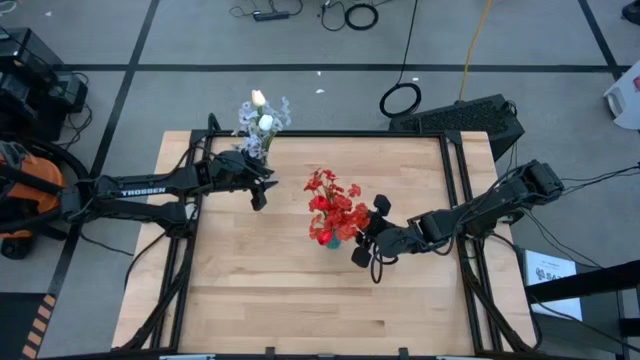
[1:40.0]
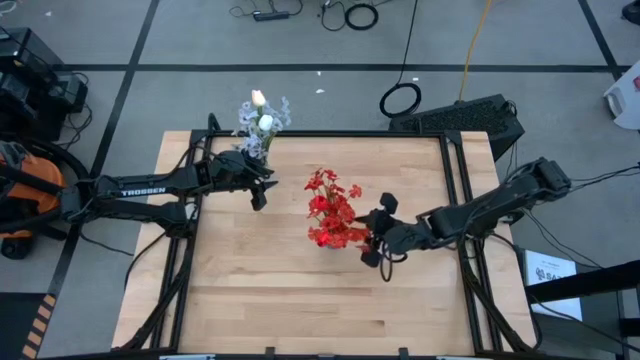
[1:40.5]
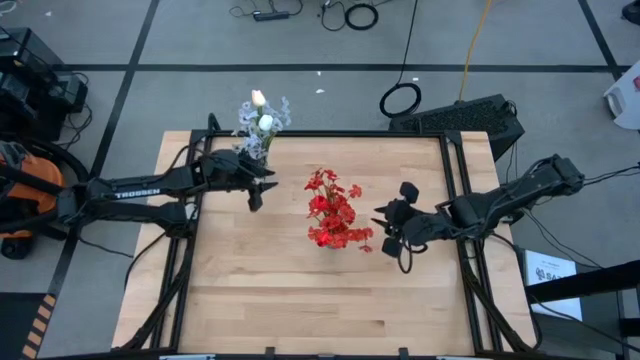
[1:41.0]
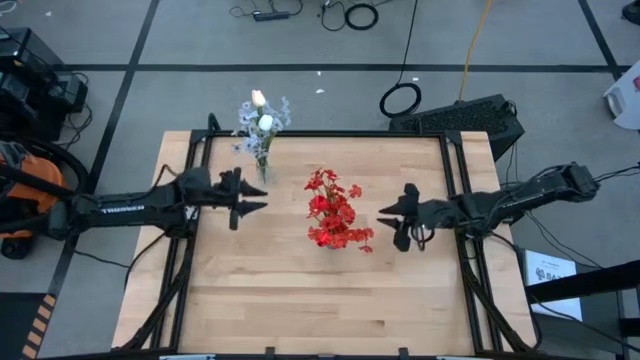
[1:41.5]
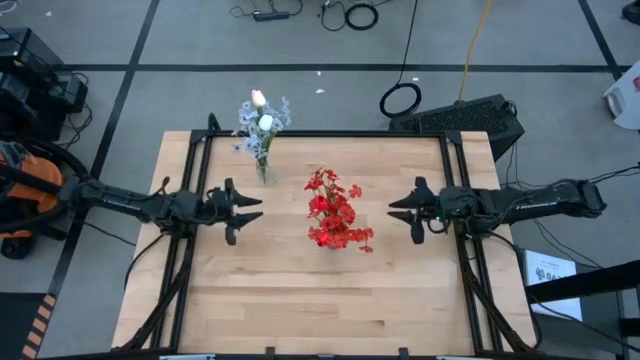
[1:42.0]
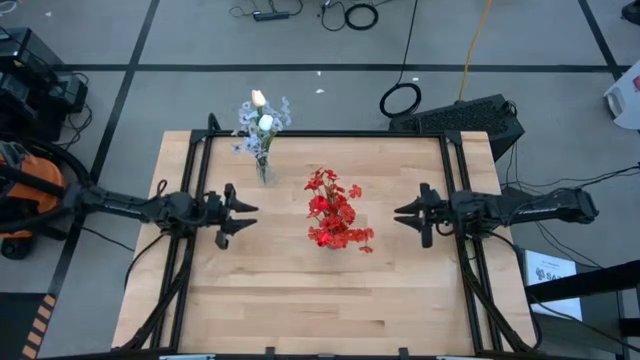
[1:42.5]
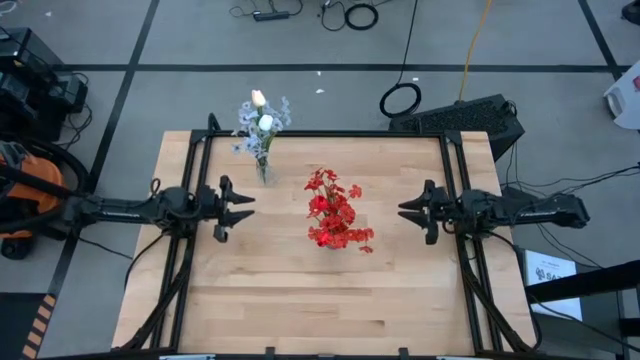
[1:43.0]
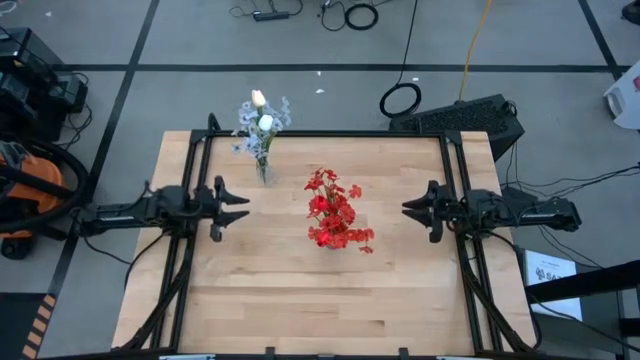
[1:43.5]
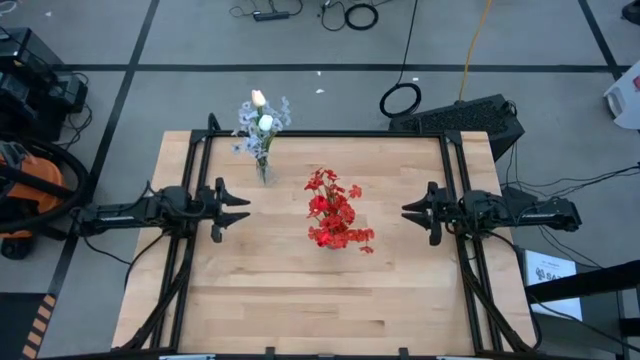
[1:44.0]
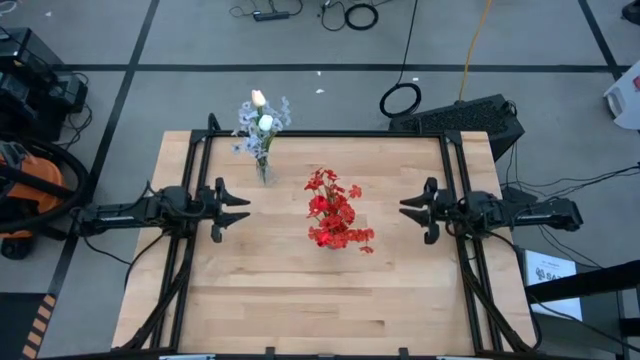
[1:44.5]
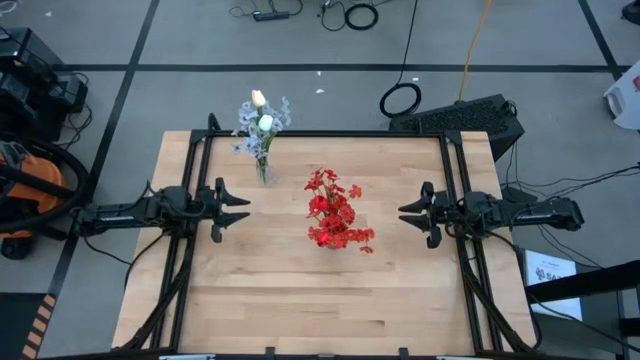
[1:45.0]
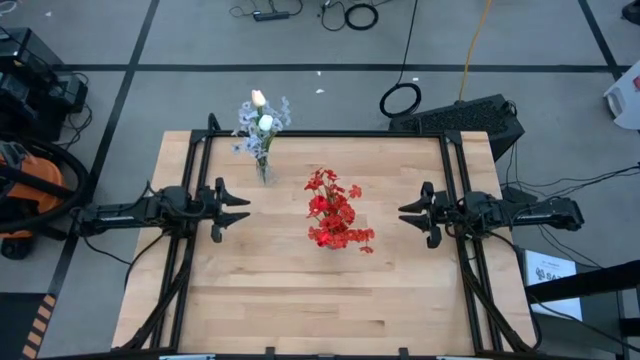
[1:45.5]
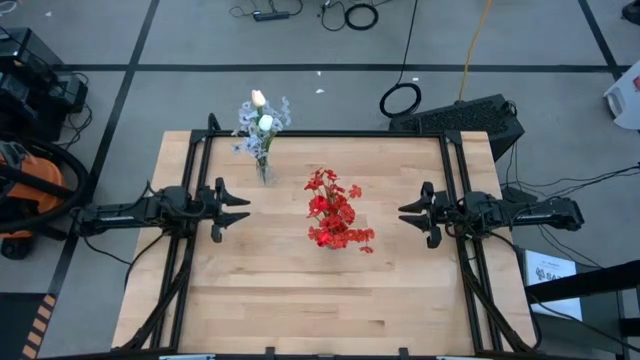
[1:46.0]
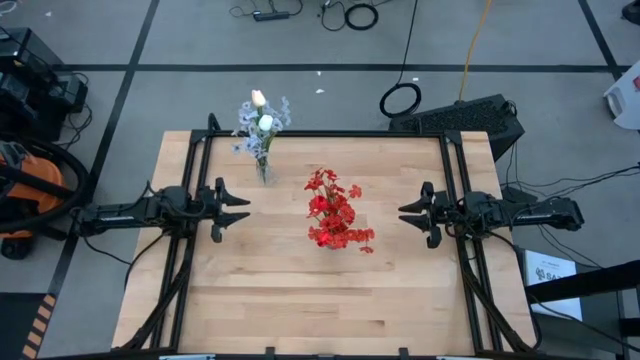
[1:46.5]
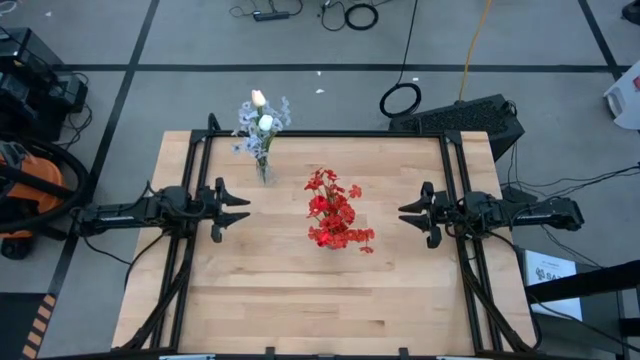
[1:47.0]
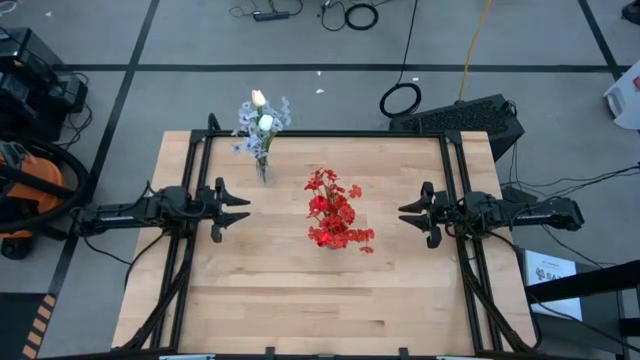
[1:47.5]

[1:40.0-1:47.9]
Task: Sort flowers into vase by color
Return to Home Position

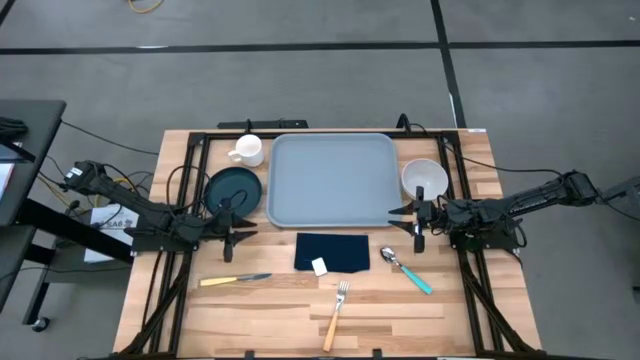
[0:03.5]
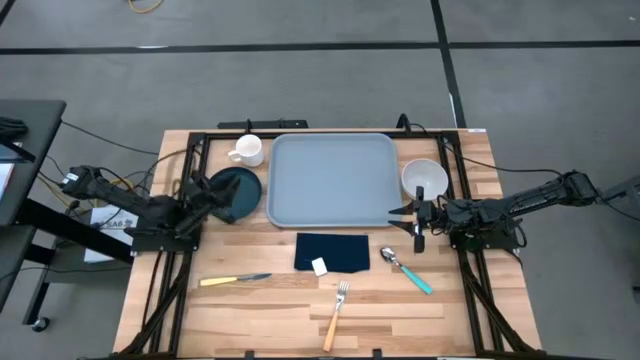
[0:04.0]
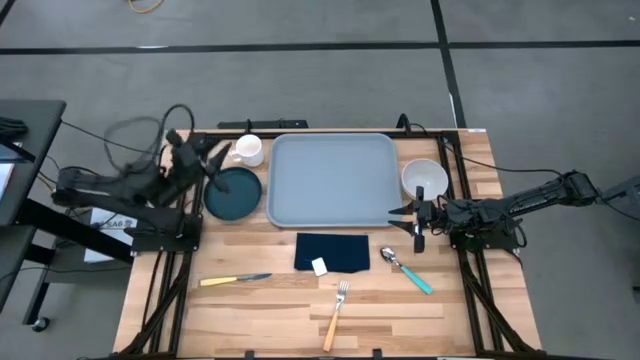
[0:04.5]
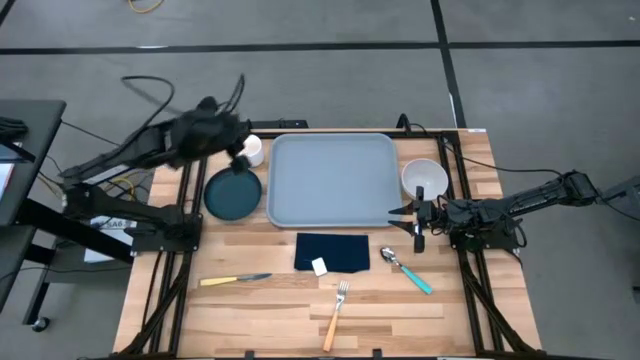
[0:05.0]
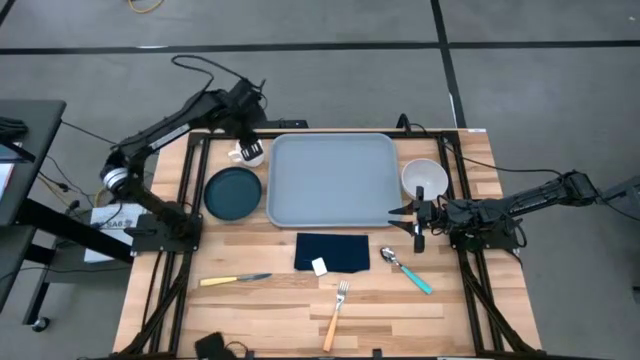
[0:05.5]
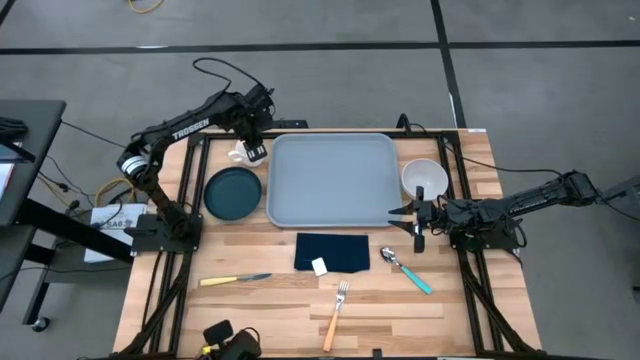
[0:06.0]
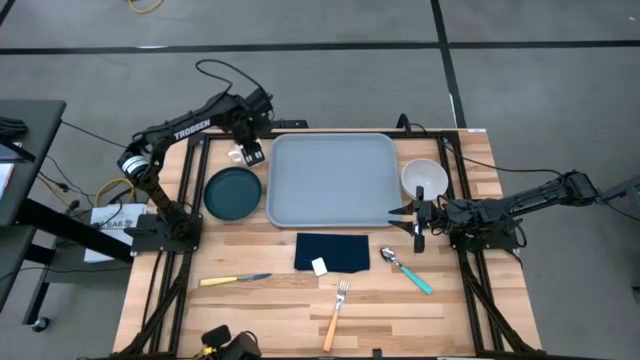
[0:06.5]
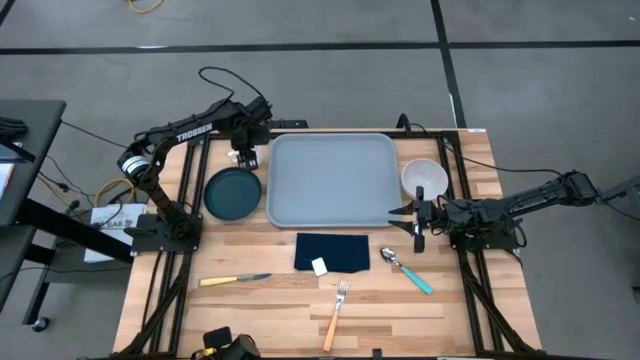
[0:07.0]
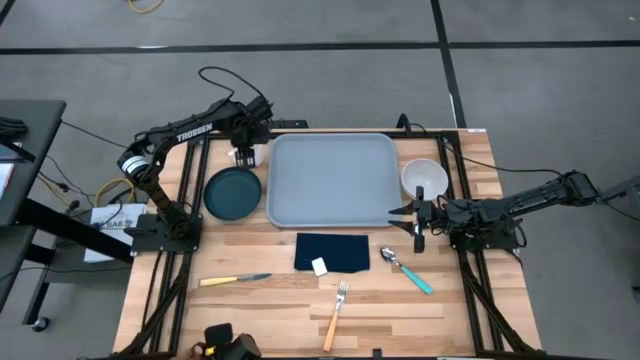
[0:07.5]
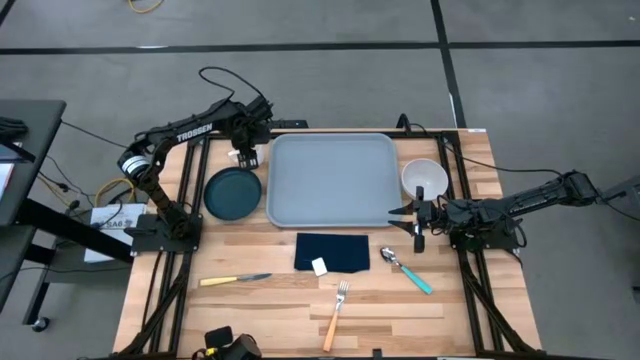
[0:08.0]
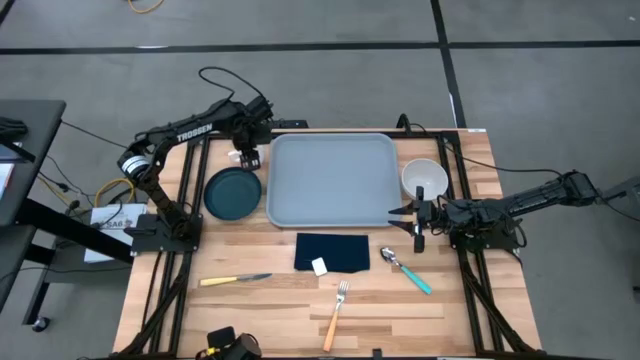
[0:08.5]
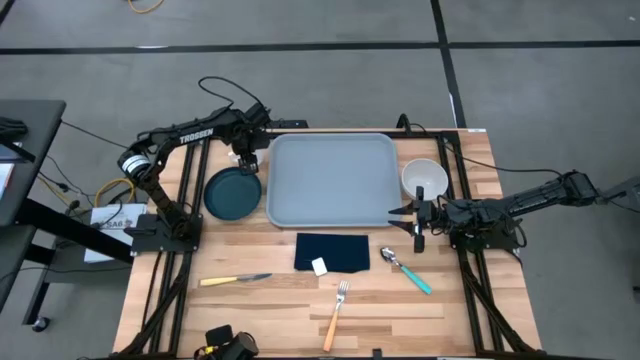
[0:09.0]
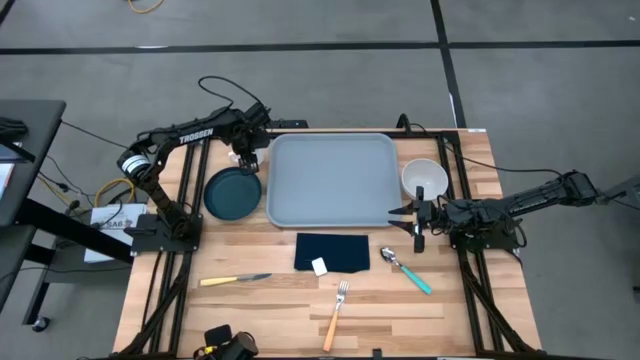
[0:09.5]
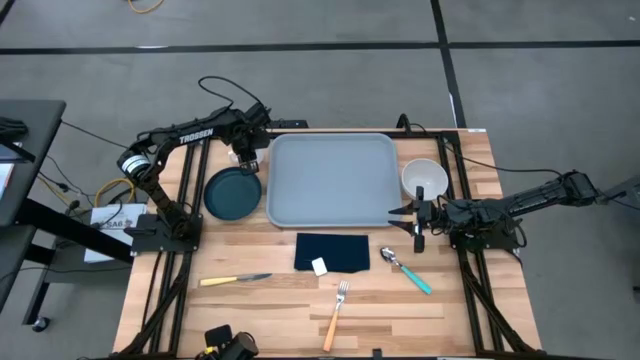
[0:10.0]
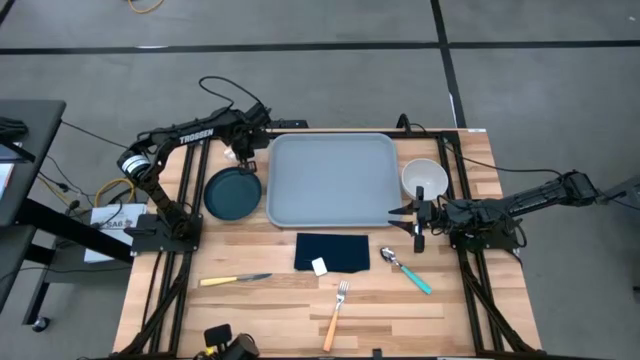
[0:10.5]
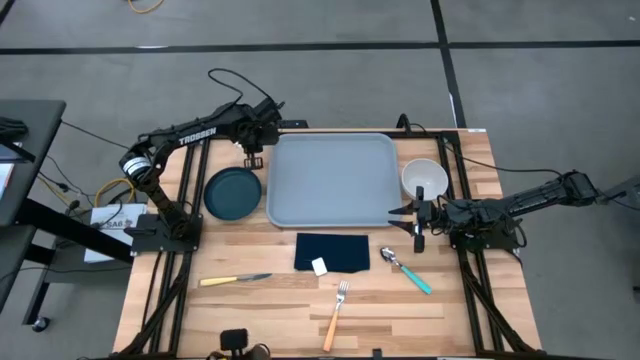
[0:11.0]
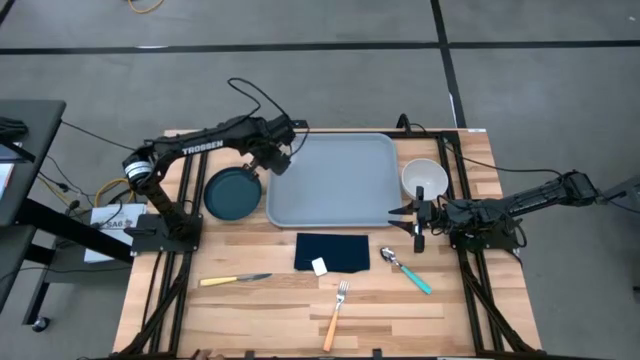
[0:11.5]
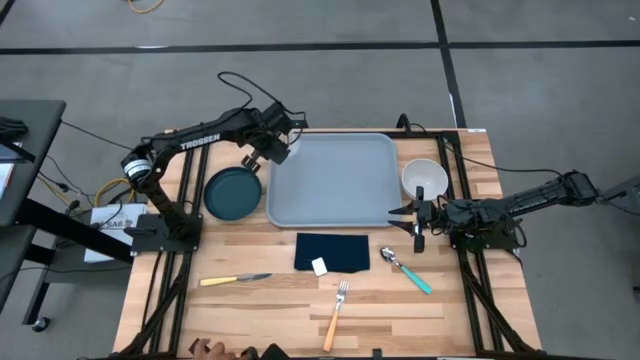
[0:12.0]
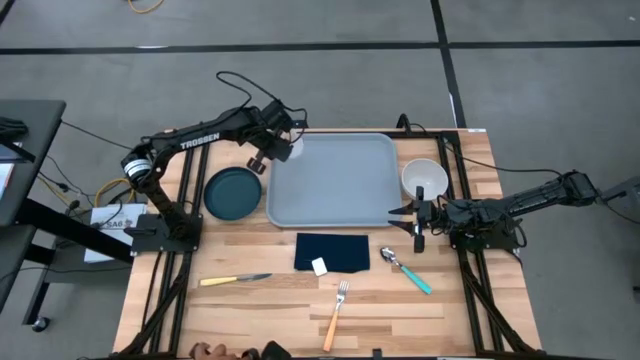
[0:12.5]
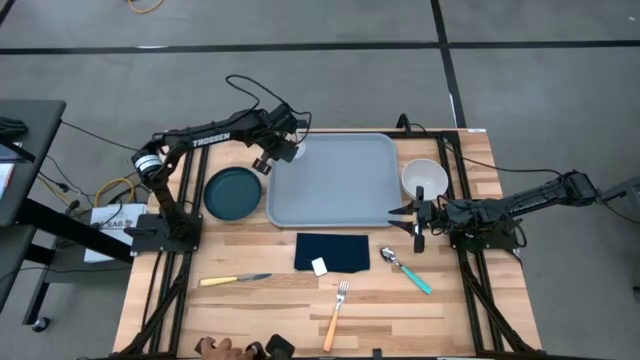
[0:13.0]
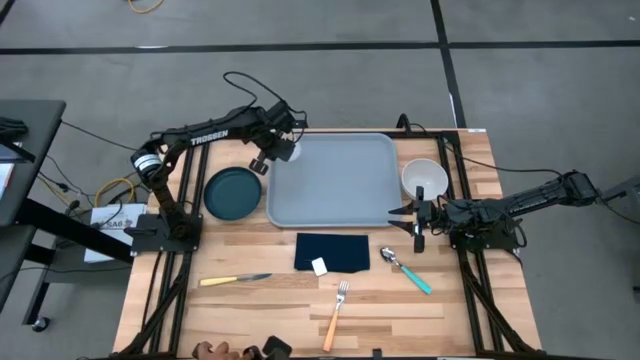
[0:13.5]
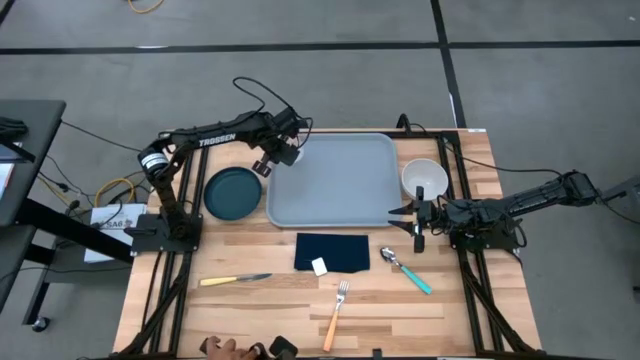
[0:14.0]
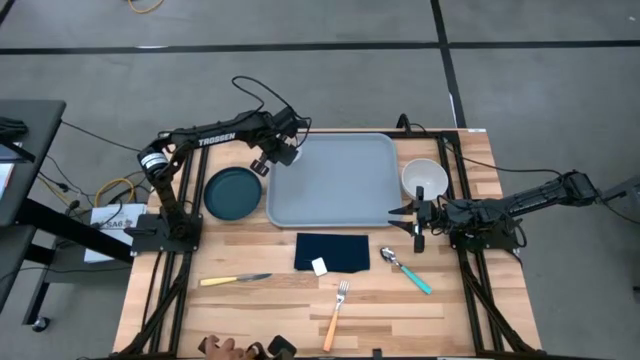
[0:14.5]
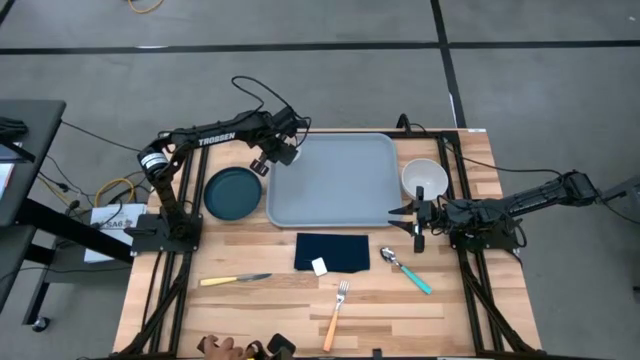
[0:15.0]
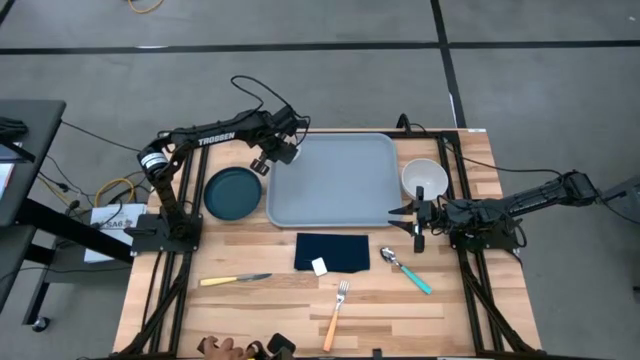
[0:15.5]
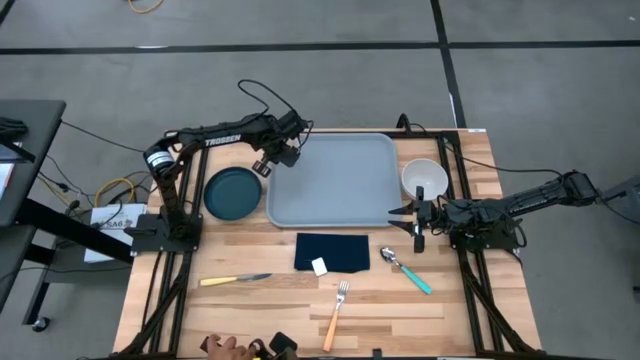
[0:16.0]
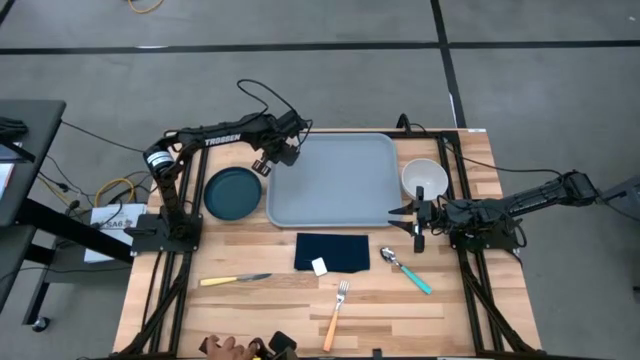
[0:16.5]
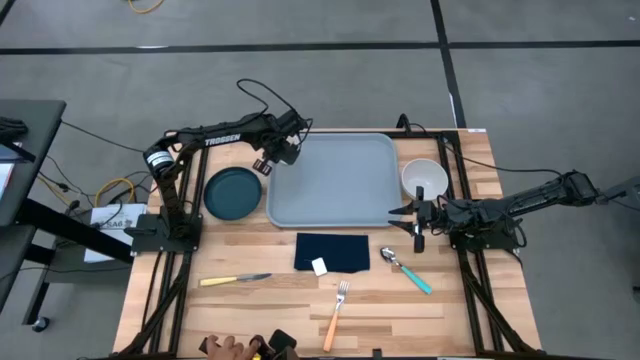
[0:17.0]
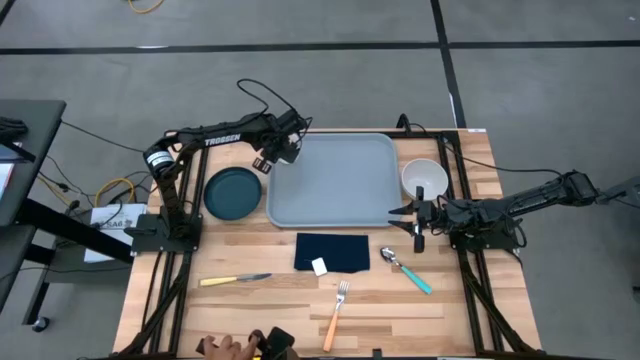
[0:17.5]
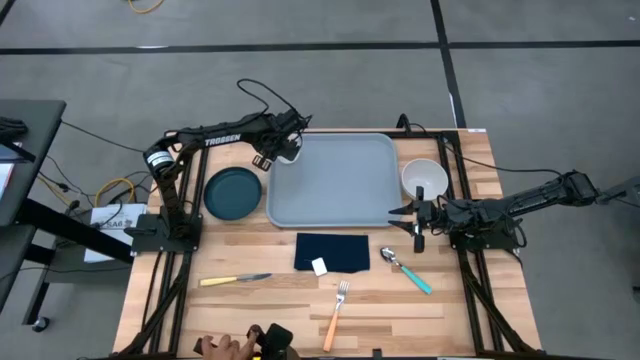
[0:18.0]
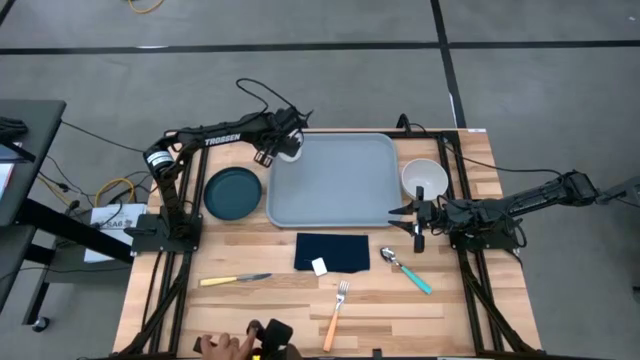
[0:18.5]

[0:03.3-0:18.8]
Task: Set up tray
Put the white cup on the gray serving tray
